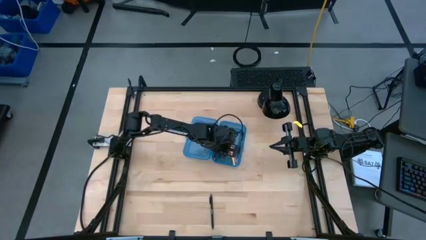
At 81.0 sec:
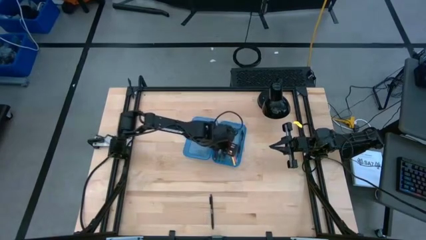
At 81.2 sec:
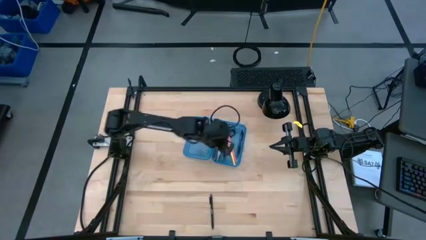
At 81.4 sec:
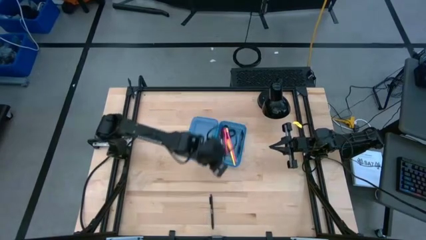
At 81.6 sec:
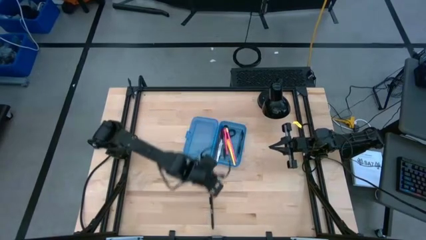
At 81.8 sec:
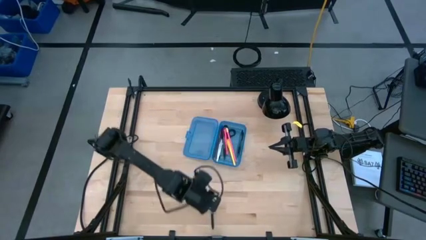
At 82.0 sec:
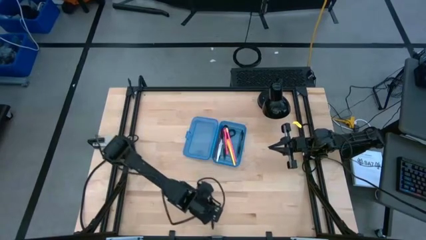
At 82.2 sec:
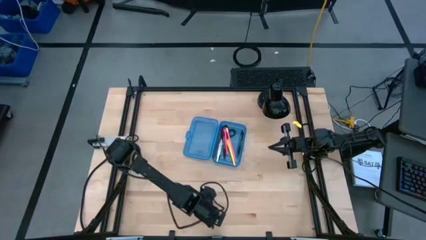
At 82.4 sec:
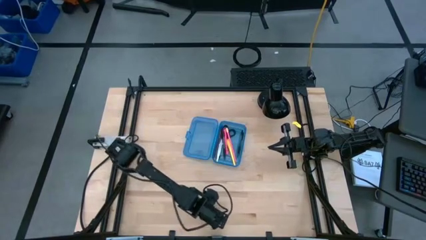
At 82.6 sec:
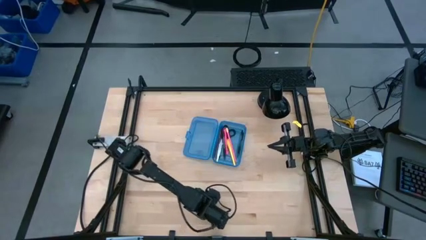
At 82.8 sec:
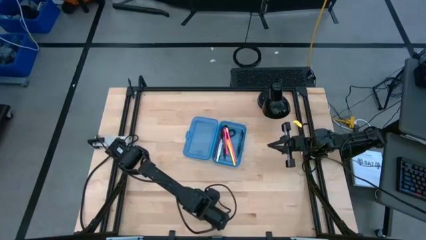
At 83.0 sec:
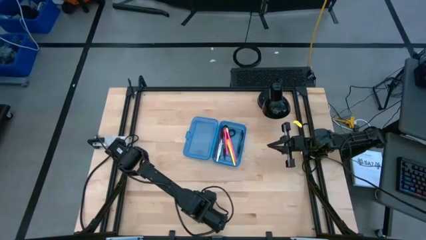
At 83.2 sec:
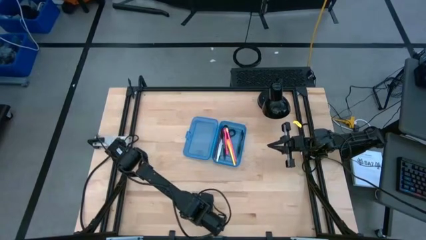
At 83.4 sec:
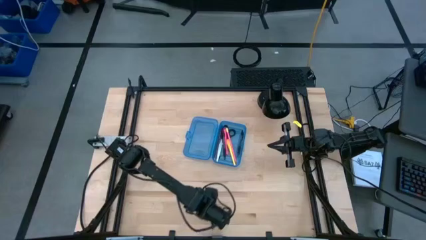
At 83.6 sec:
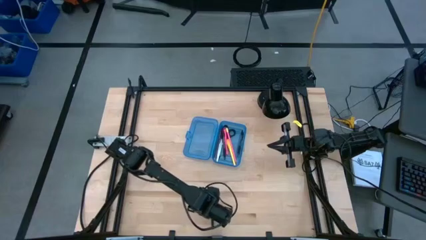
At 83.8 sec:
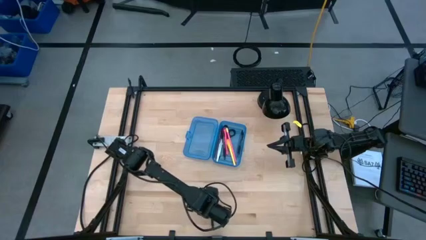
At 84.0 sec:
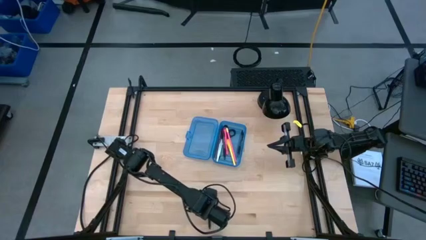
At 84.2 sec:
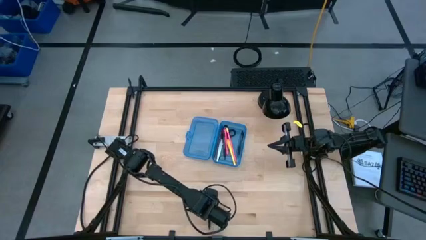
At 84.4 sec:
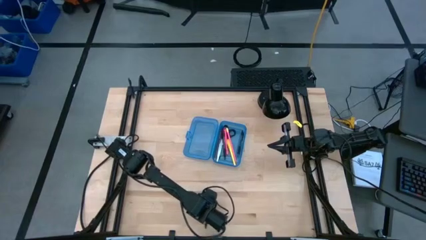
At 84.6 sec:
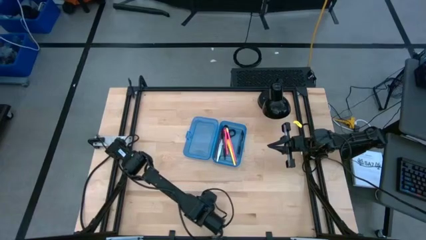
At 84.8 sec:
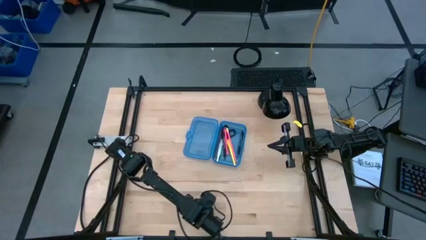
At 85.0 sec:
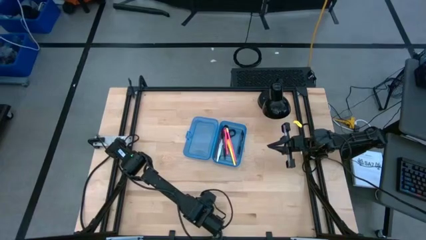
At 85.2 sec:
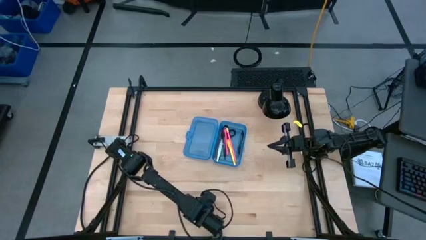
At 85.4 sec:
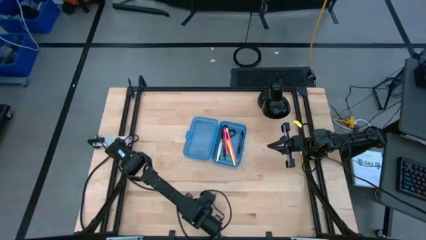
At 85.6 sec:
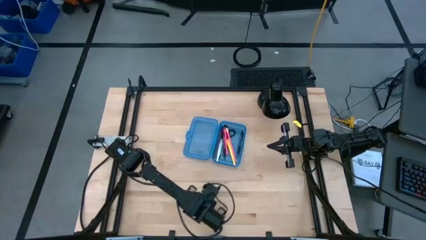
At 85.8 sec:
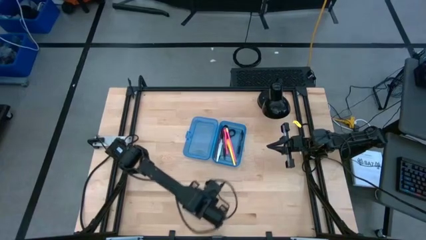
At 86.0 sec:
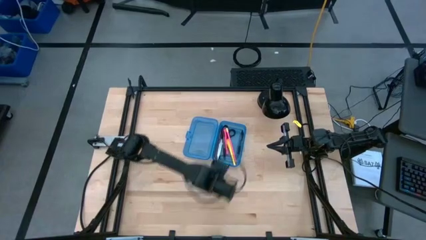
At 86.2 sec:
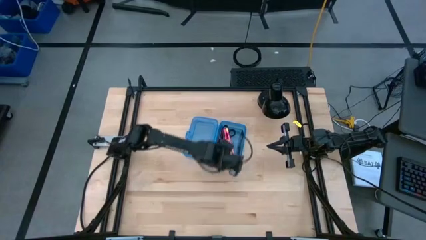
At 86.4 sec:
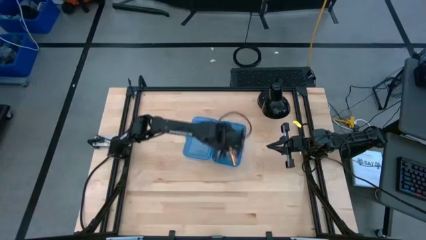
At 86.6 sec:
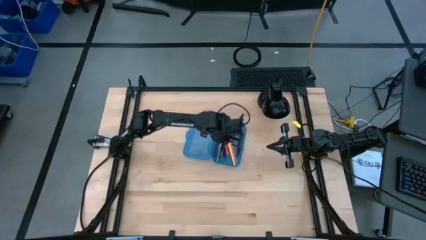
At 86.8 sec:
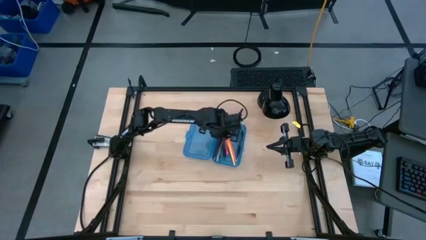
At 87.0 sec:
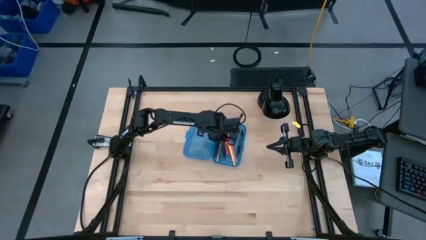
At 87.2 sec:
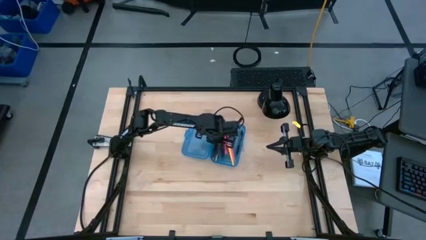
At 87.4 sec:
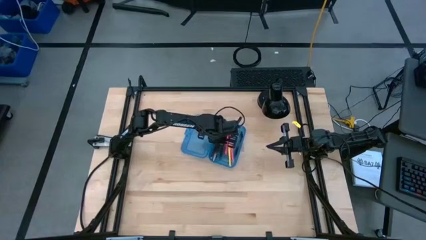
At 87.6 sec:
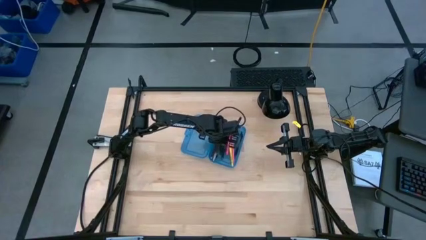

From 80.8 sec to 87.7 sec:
Task: Pick & place school supplies into a supply box
Put the black pen into the supply box

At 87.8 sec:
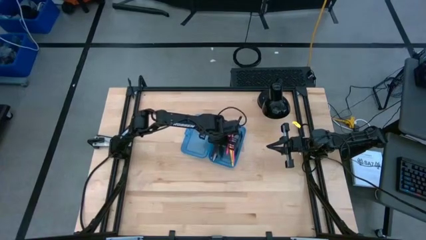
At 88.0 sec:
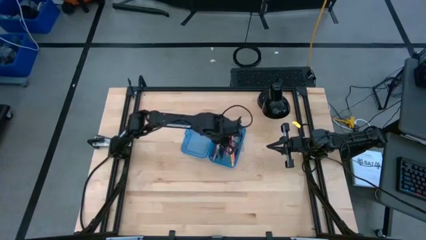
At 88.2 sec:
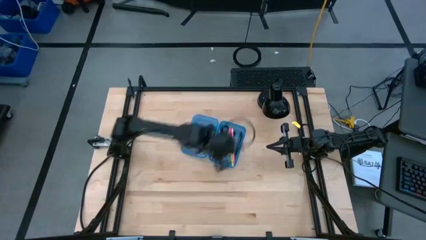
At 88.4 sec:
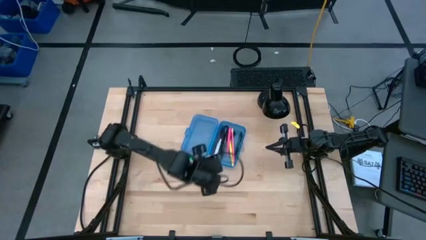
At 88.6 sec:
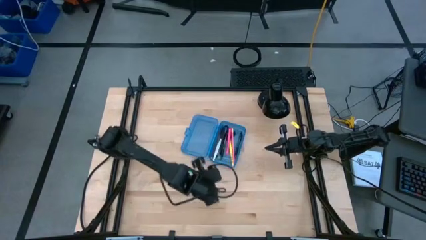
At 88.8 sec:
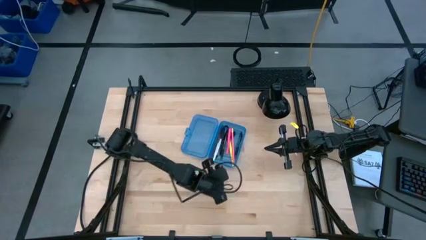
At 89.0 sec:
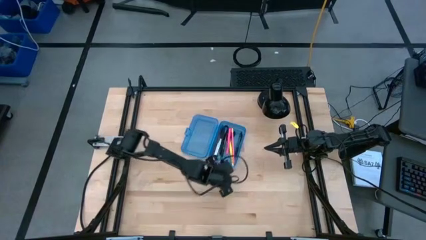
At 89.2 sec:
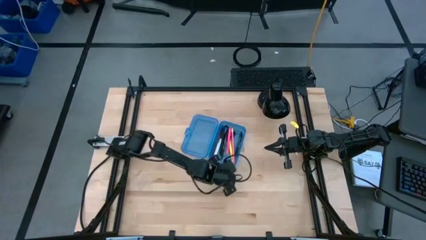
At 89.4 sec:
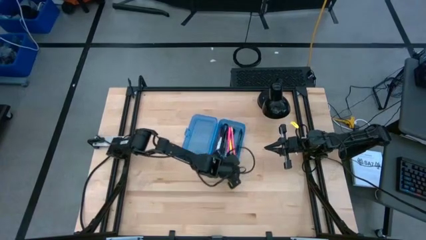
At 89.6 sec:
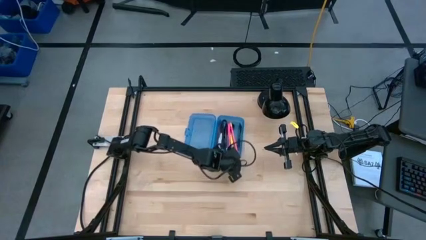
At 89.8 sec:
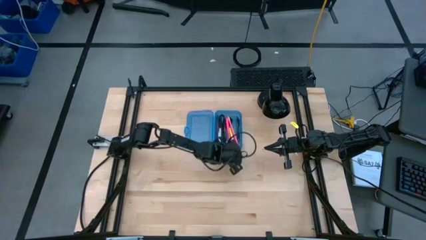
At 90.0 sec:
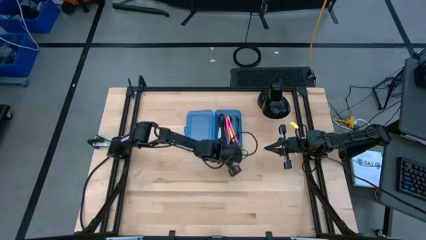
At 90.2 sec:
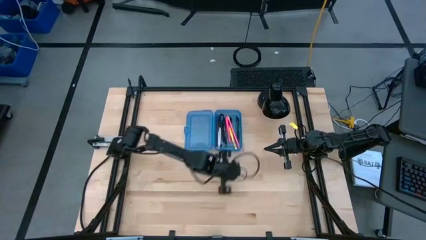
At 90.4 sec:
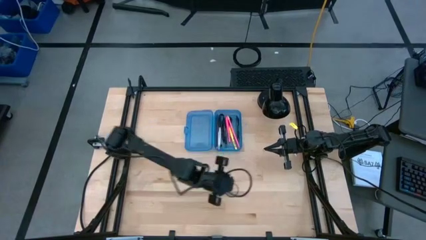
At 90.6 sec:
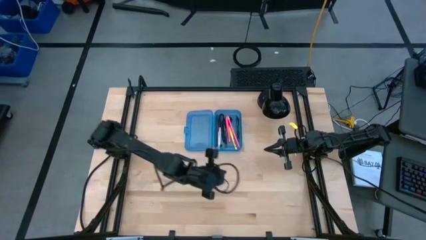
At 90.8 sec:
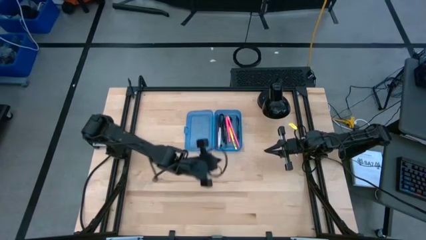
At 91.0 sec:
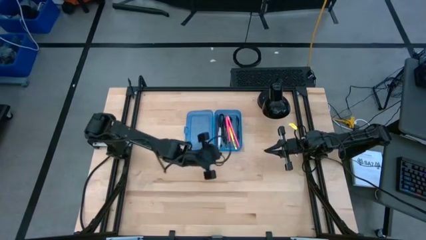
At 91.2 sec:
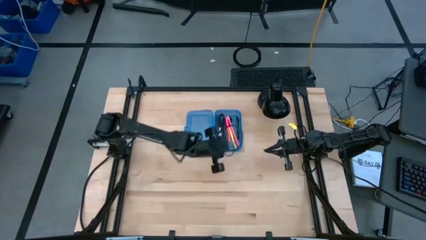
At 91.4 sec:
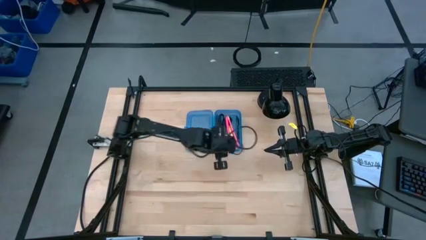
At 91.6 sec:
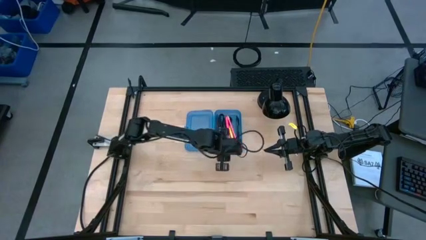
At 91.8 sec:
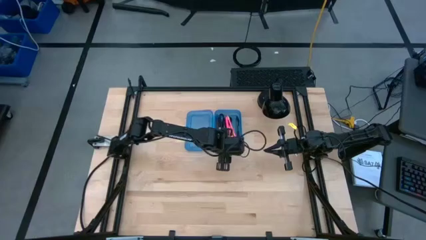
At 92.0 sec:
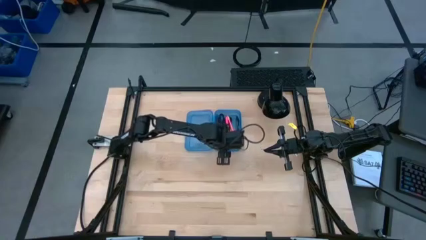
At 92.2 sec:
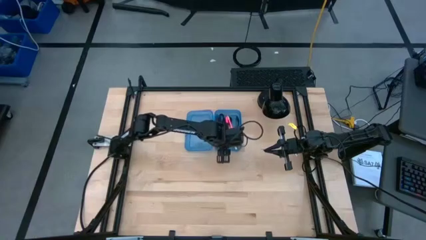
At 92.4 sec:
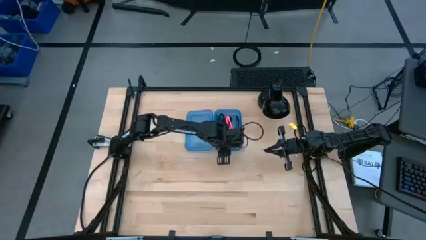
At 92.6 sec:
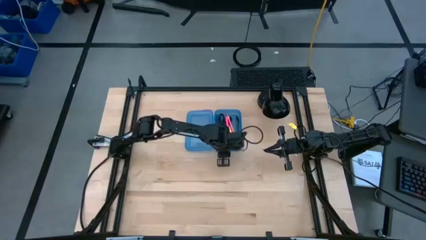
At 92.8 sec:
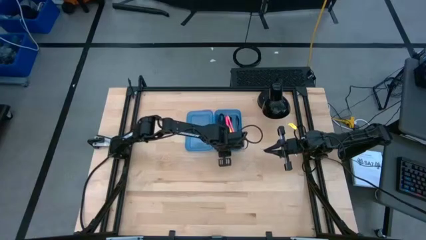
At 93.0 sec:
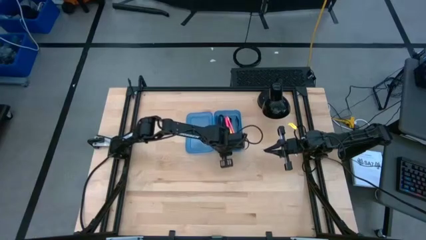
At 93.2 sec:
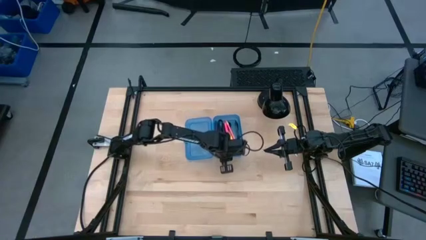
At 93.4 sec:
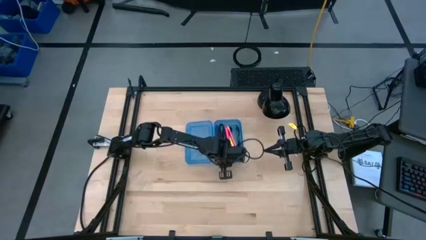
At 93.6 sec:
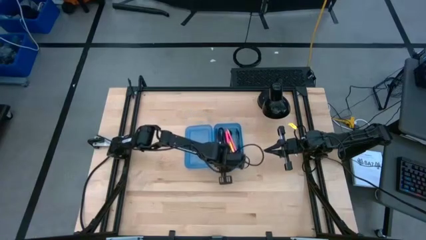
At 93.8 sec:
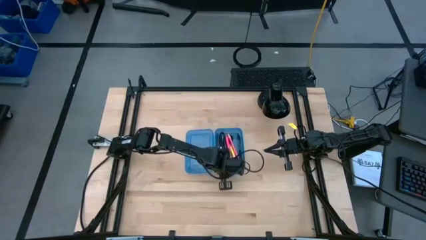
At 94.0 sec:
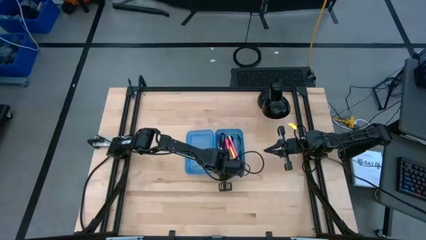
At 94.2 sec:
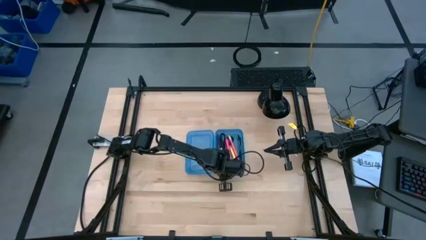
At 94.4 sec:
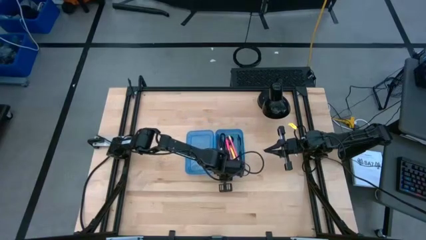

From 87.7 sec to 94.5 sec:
Adjust the supply box on the table

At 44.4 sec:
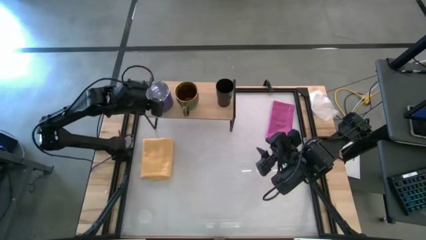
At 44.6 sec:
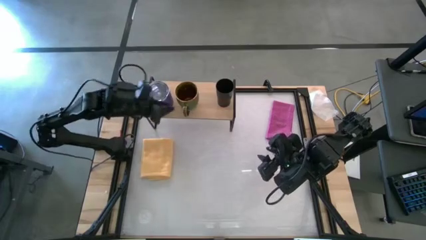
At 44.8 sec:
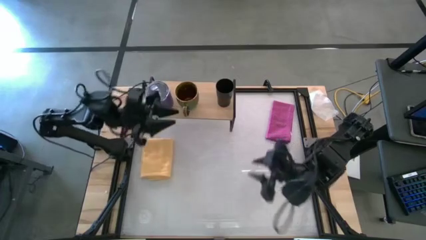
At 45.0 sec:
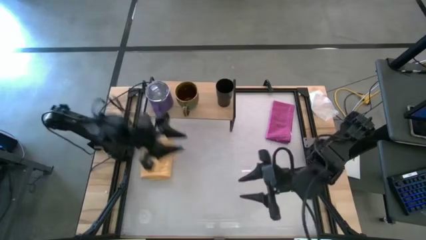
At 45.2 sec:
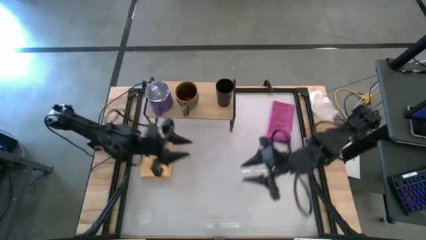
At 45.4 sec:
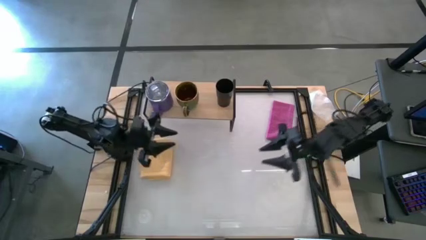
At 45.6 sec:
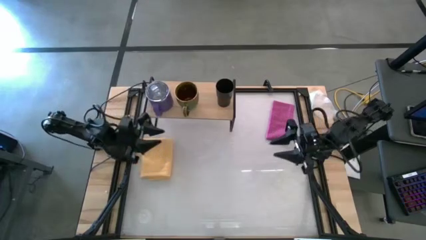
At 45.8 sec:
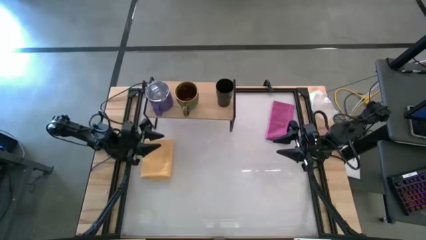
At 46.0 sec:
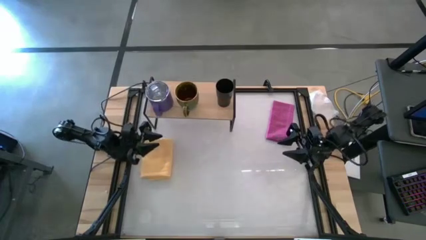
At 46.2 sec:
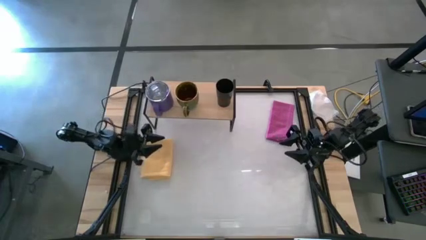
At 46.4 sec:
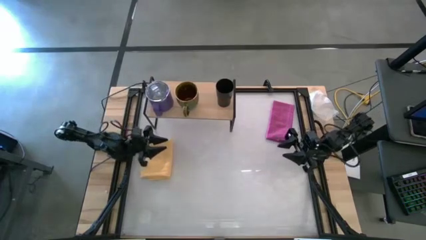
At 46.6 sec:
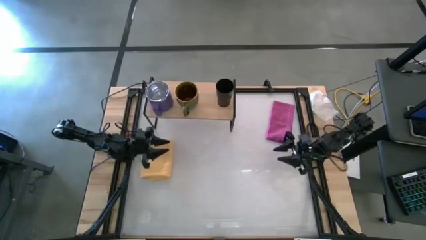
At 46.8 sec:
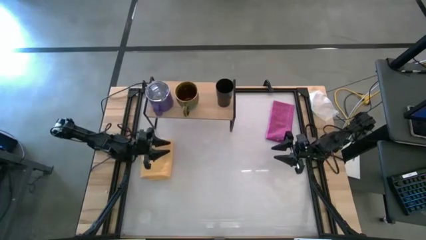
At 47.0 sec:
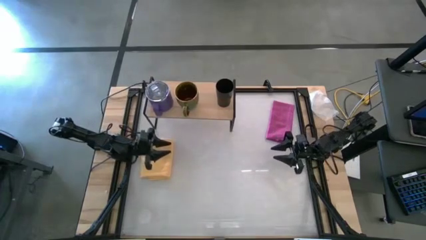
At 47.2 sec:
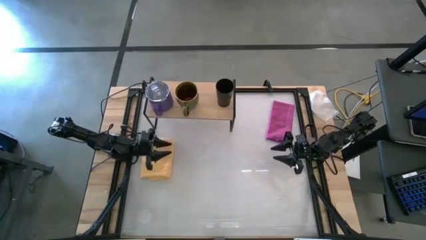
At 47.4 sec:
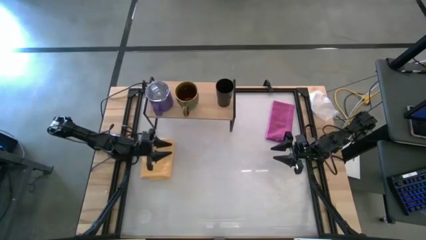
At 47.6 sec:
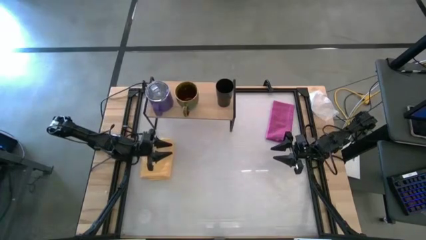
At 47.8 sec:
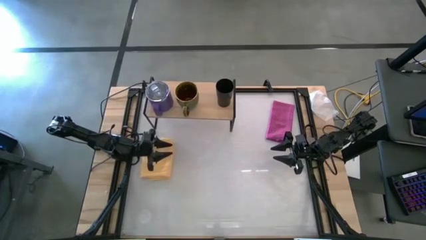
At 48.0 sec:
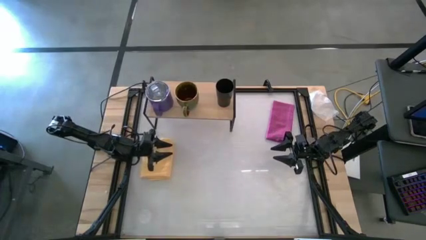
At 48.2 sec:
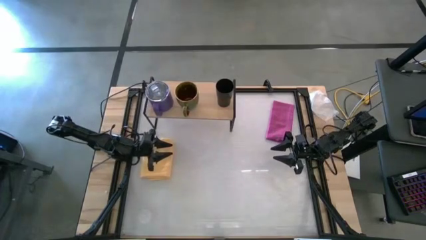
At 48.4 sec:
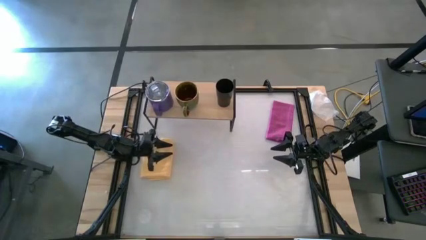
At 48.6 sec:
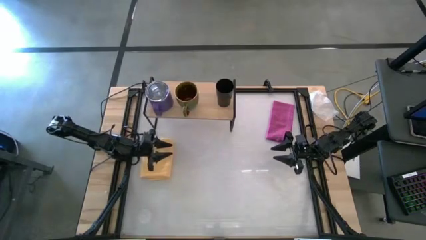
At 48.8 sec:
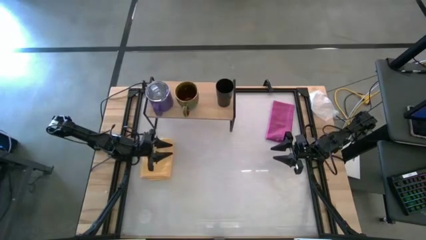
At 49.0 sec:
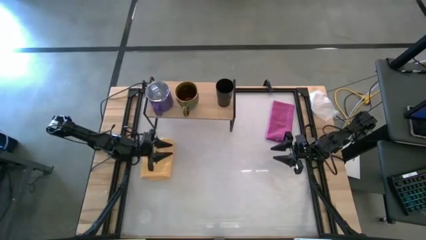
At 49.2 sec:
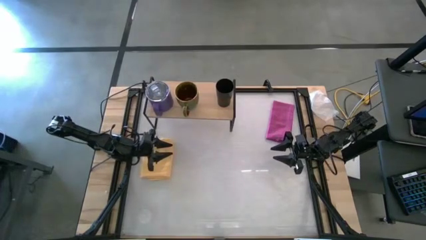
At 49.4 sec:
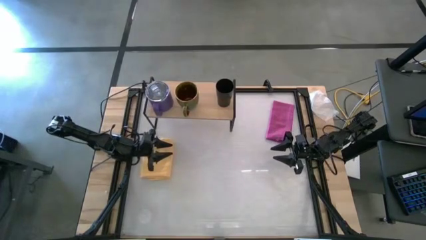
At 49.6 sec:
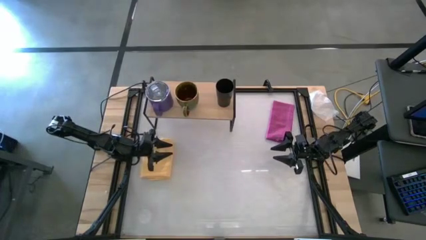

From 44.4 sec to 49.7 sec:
Task: Stack small to large cups/mugs on shelf
Return to Home Position
